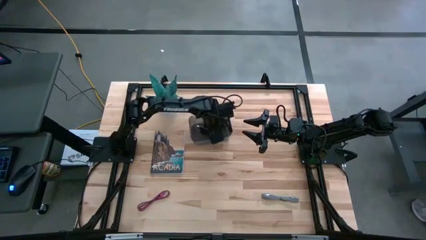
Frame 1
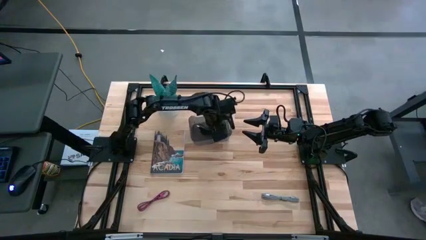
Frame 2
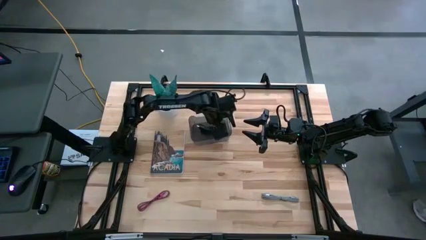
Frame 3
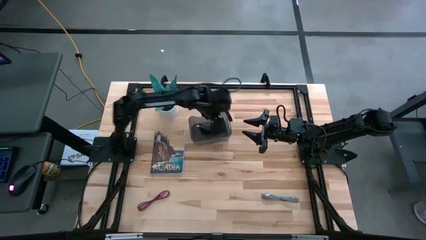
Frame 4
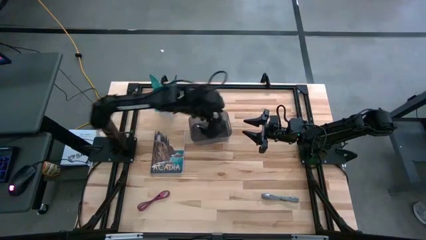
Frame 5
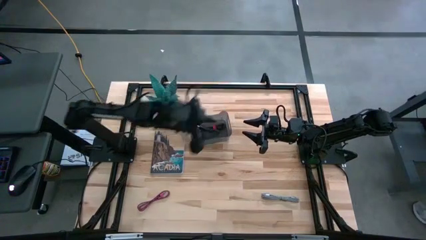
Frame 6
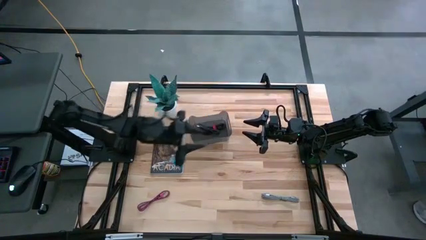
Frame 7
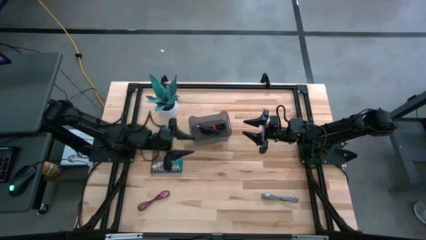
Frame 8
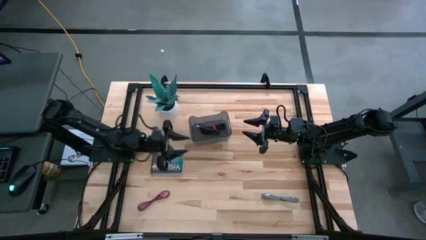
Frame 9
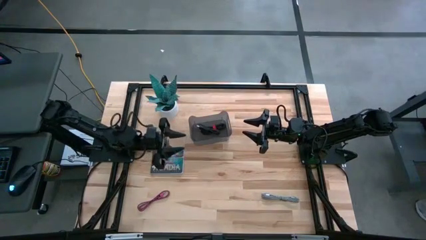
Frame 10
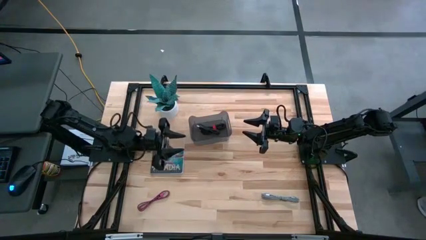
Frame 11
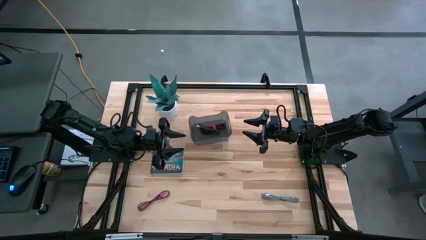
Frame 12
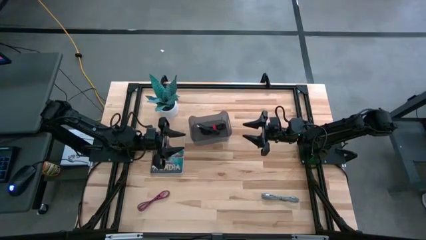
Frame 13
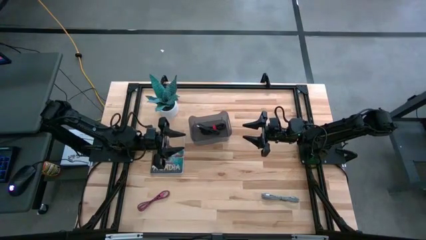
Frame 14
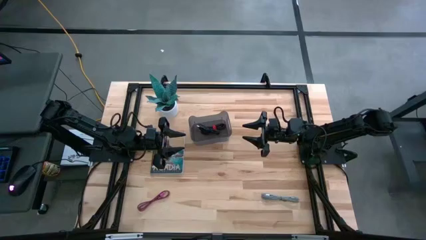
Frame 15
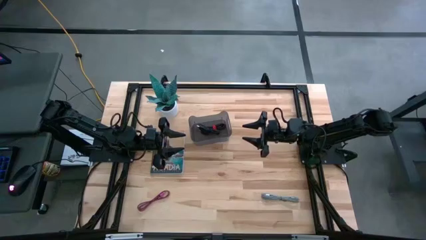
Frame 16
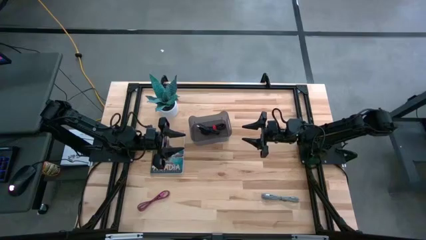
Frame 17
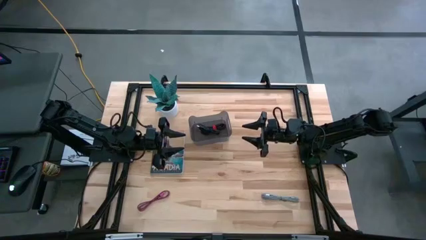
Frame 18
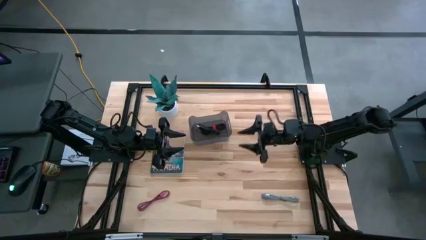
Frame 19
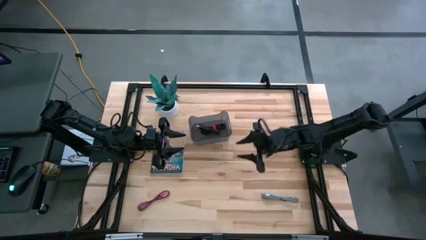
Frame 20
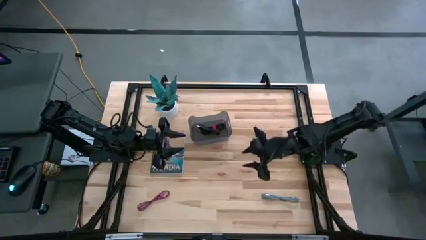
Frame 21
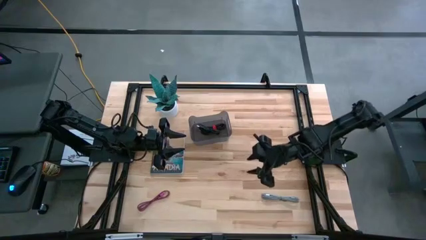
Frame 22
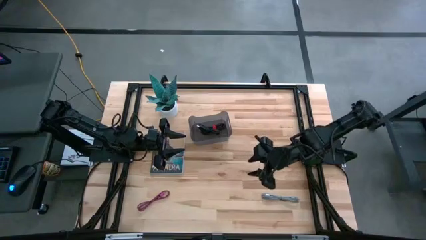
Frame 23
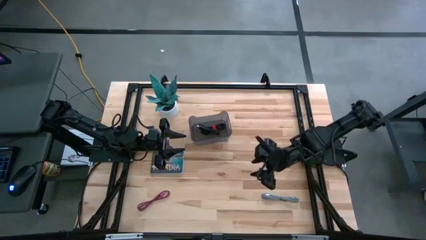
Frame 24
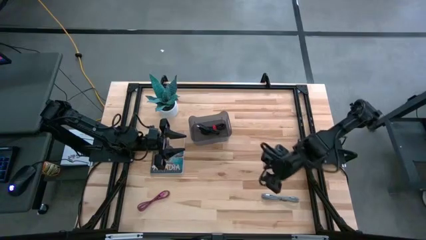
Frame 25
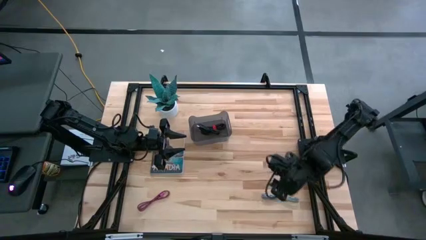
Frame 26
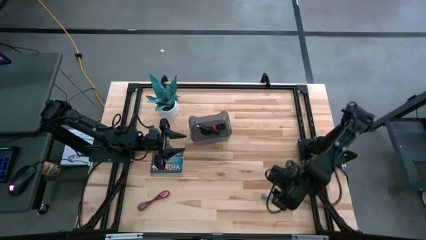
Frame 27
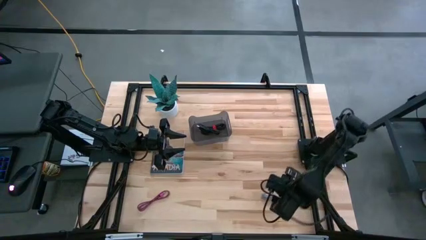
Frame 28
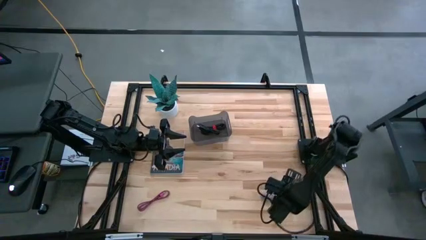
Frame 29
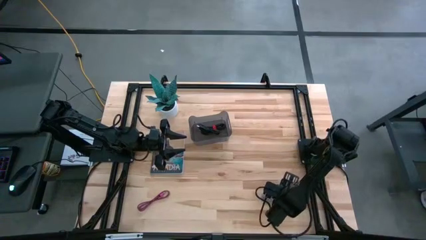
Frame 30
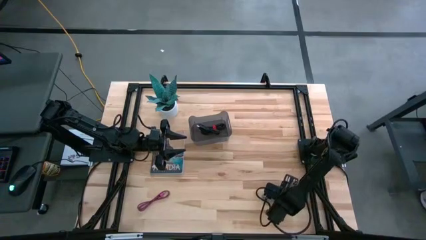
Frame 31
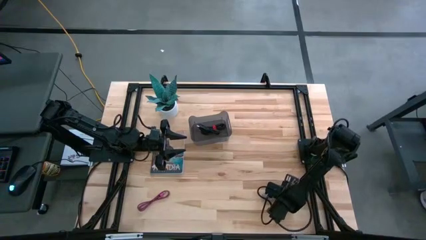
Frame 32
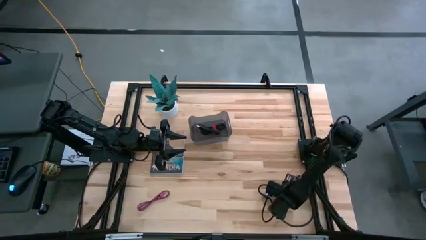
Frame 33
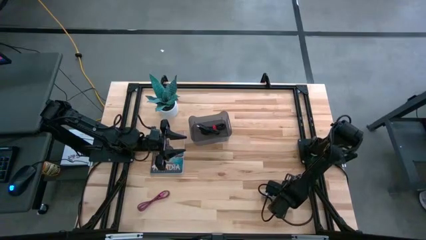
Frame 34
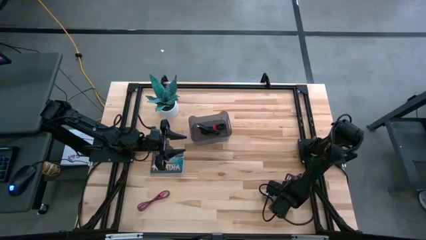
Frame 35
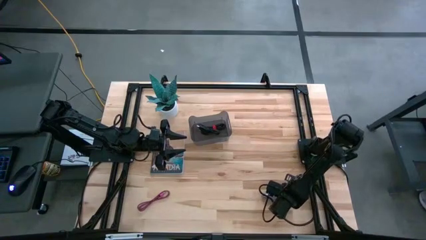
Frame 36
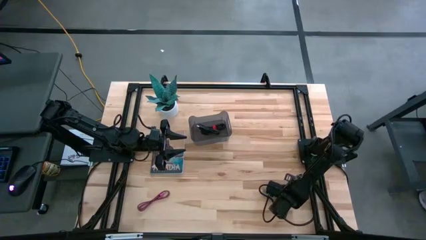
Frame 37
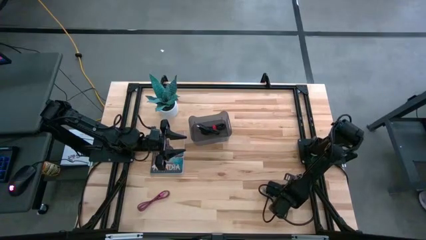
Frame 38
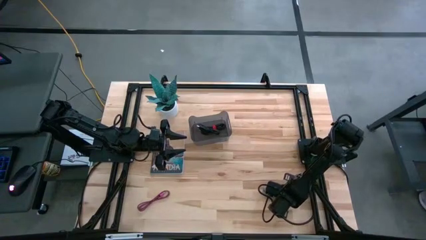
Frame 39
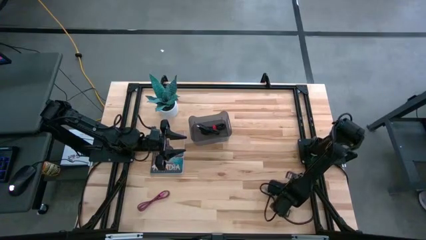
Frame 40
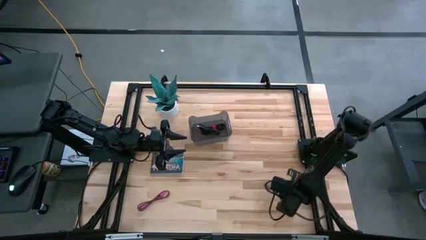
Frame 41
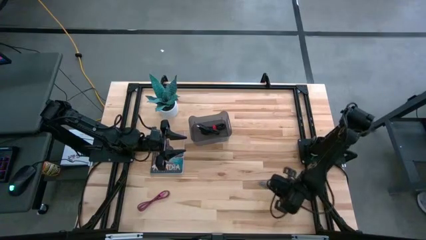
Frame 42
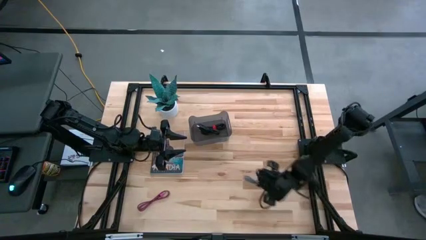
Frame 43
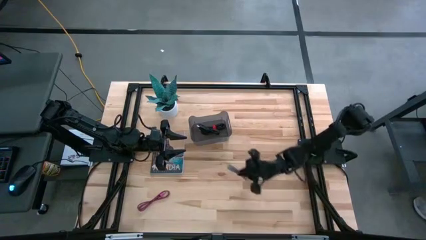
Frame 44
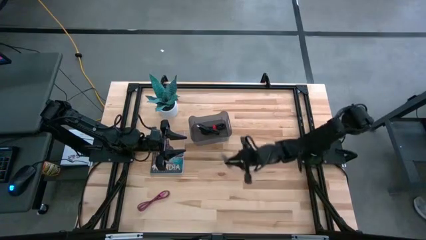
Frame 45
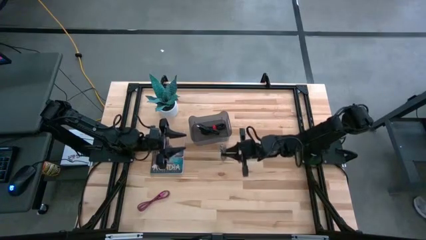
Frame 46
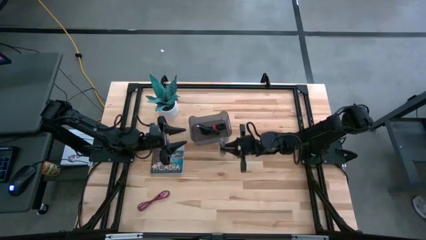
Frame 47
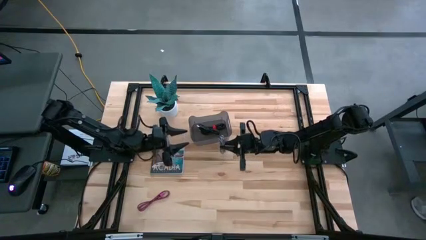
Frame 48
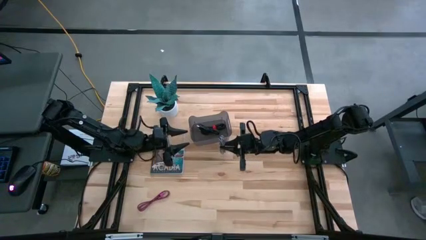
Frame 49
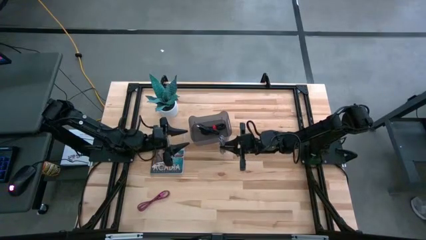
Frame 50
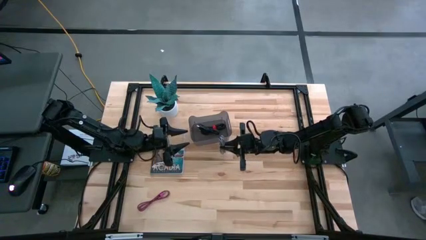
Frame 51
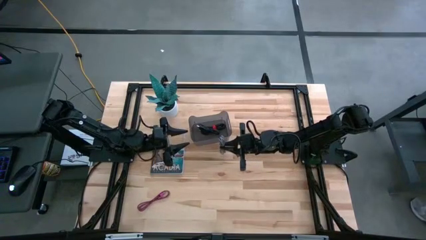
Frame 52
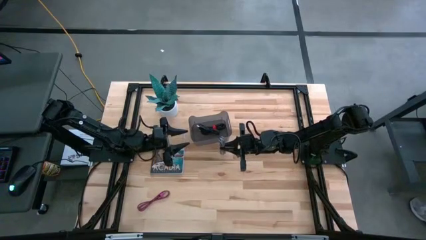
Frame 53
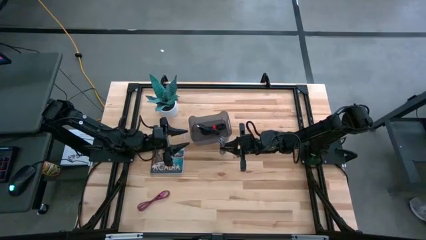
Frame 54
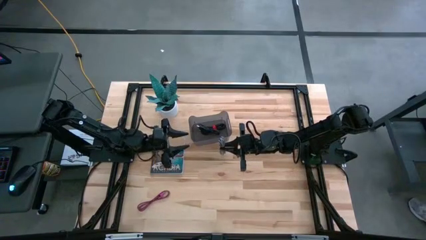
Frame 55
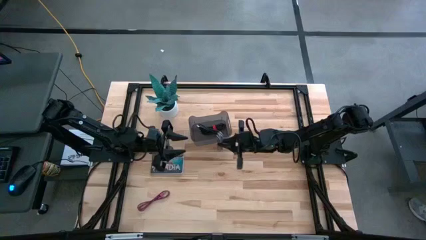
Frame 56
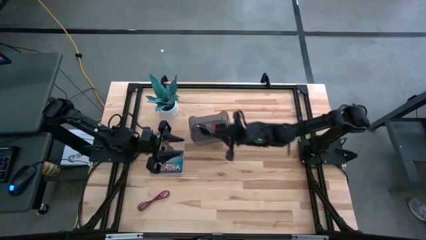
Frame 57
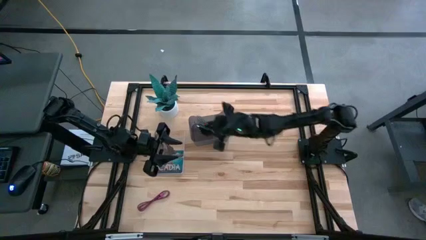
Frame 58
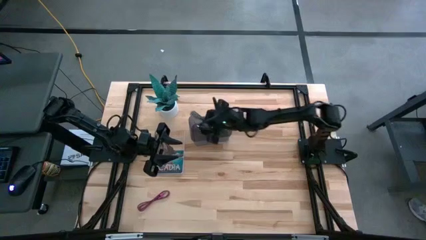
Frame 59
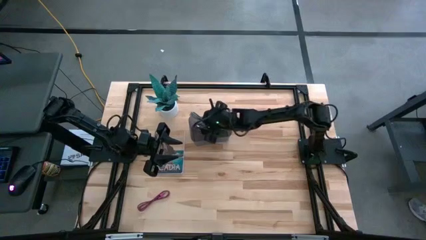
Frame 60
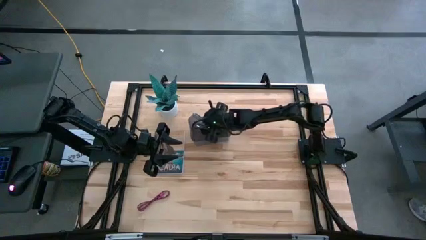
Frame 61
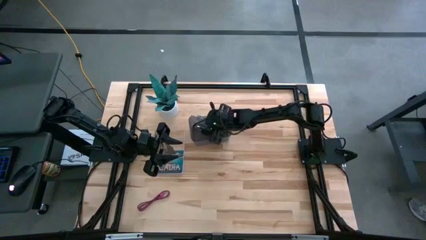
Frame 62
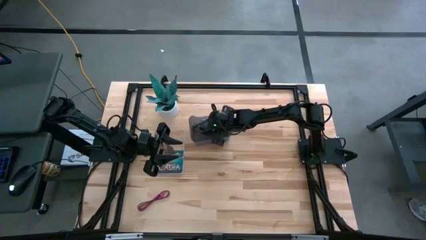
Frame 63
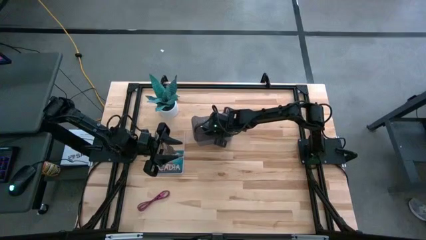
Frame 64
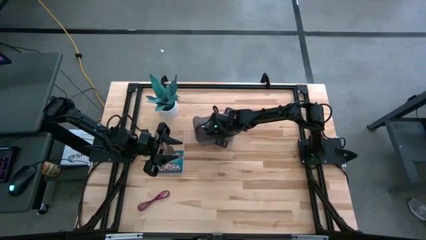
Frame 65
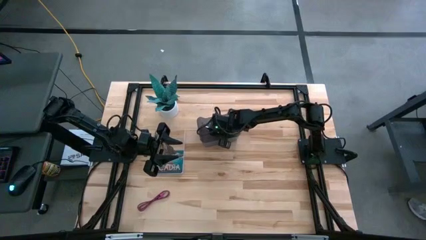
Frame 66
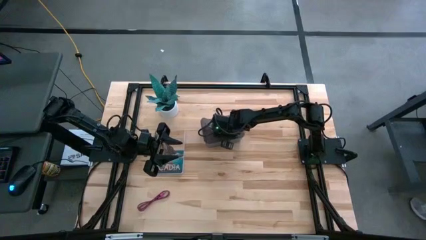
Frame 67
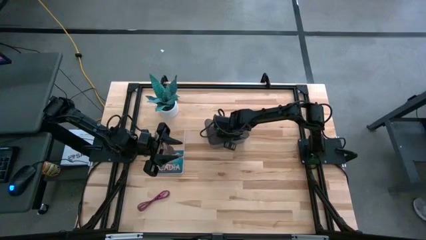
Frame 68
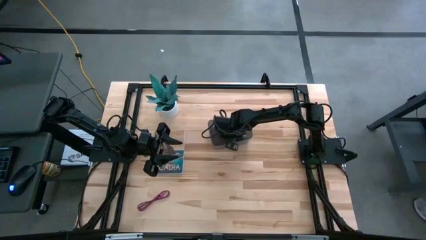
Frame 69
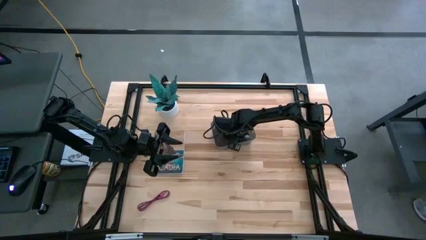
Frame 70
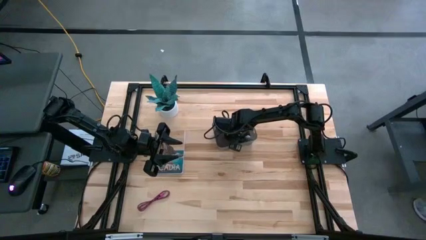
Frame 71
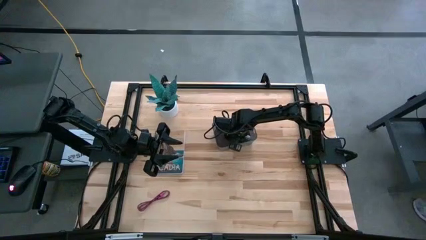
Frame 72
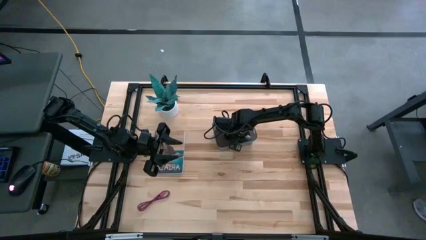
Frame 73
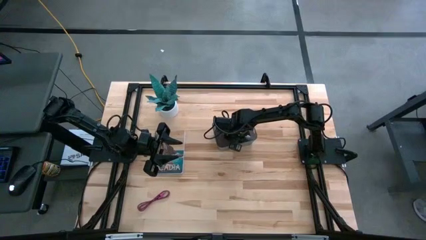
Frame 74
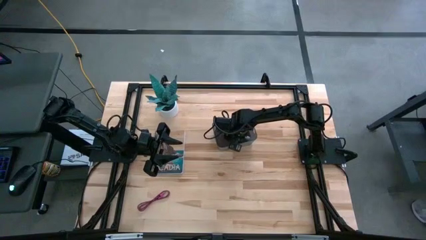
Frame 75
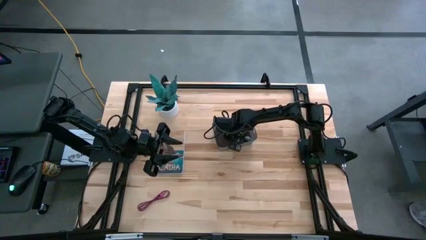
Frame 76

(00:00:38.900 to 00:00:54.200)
Task: Pick and place USB-C Cables
Put the white USB cable into the black bin
